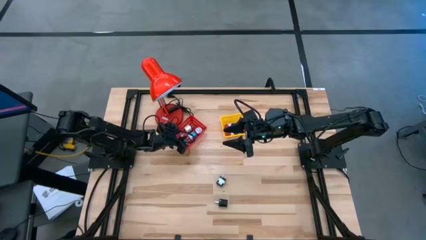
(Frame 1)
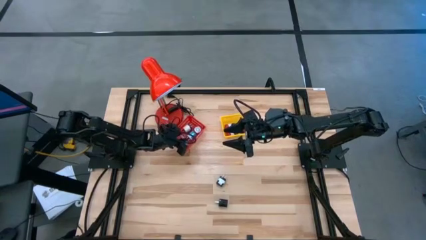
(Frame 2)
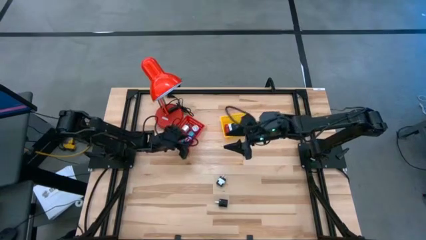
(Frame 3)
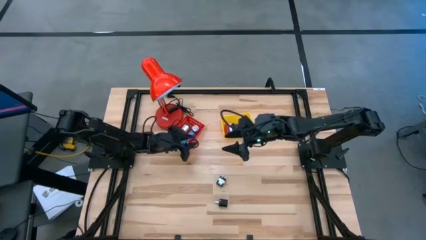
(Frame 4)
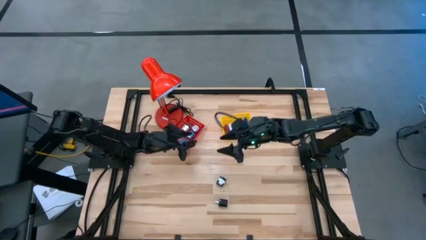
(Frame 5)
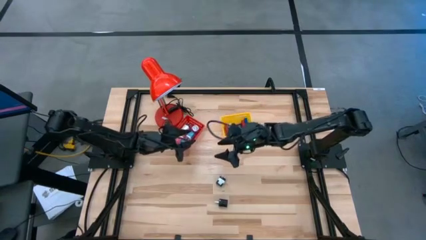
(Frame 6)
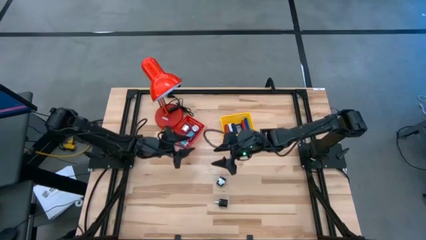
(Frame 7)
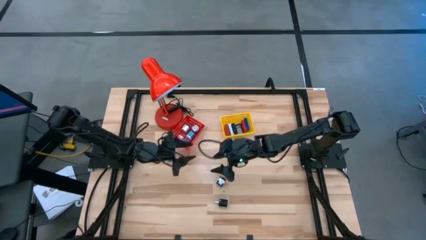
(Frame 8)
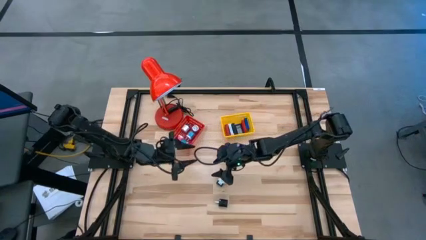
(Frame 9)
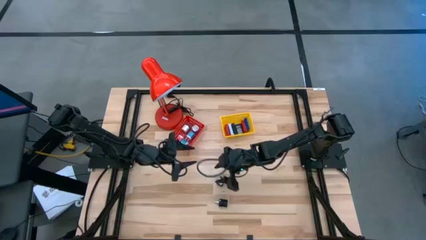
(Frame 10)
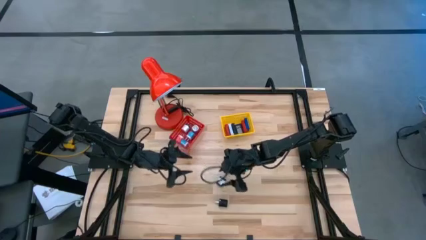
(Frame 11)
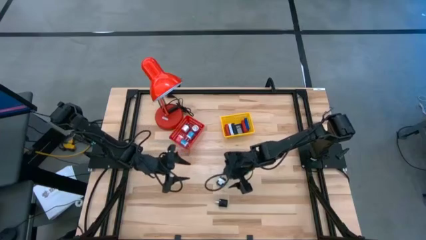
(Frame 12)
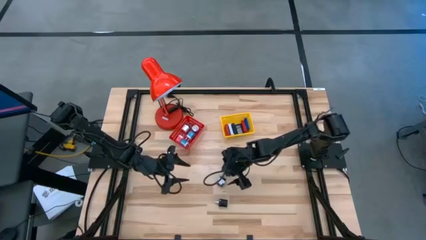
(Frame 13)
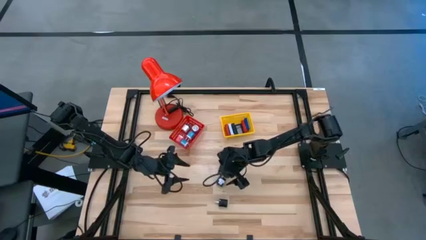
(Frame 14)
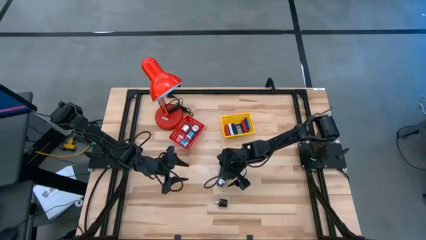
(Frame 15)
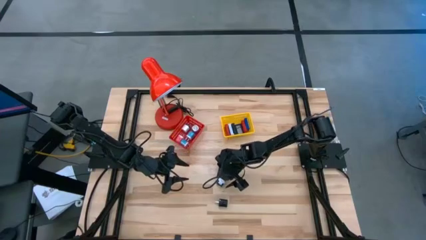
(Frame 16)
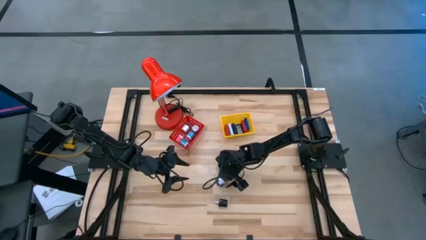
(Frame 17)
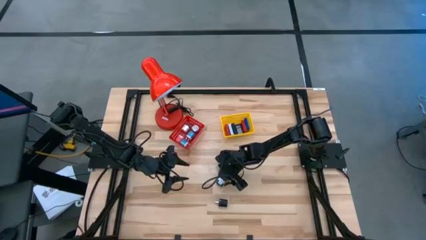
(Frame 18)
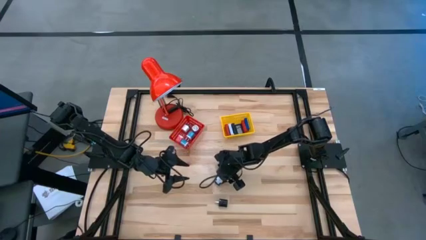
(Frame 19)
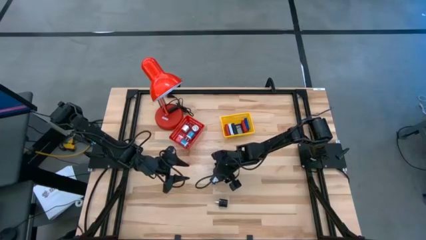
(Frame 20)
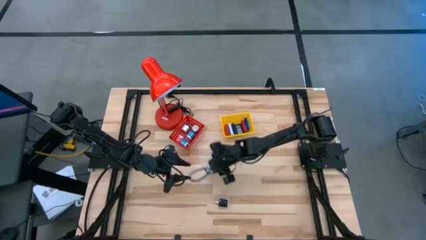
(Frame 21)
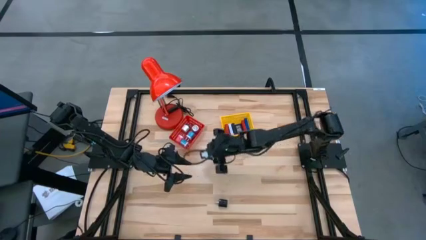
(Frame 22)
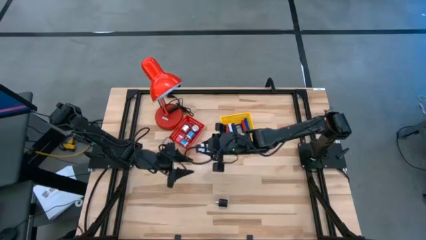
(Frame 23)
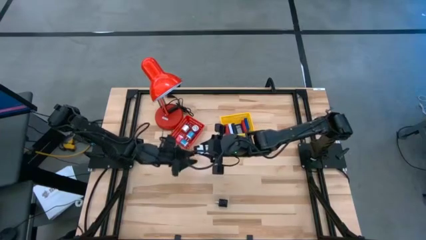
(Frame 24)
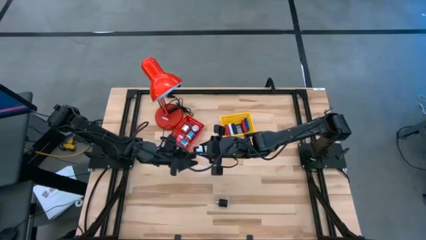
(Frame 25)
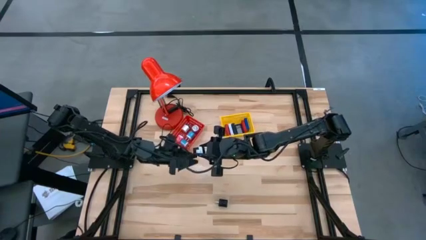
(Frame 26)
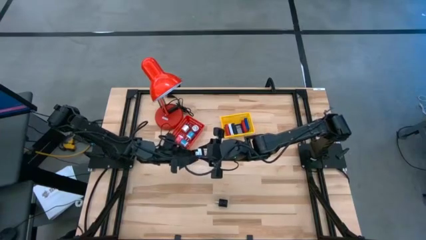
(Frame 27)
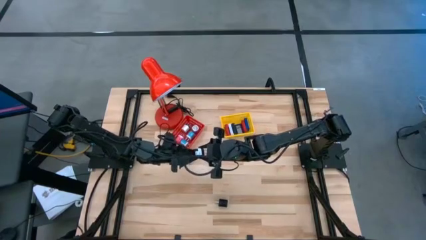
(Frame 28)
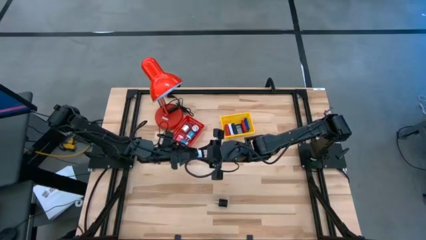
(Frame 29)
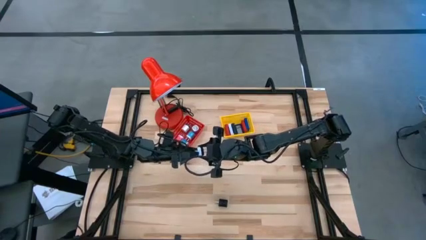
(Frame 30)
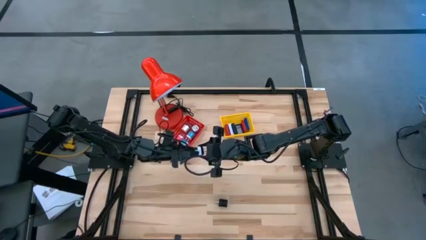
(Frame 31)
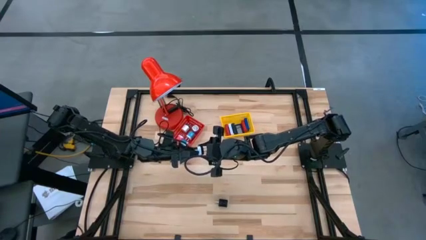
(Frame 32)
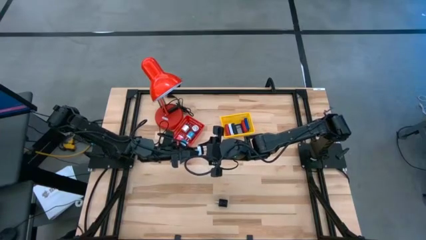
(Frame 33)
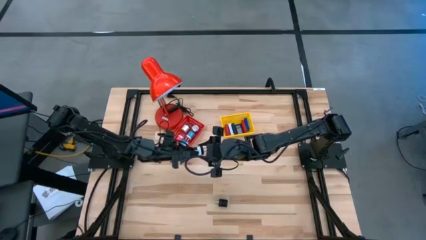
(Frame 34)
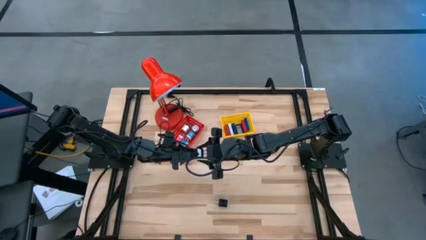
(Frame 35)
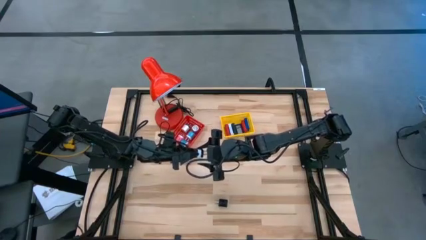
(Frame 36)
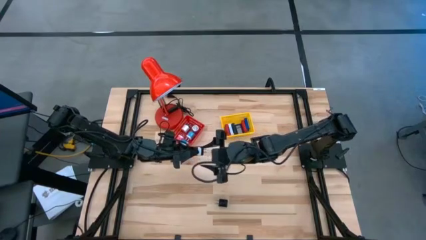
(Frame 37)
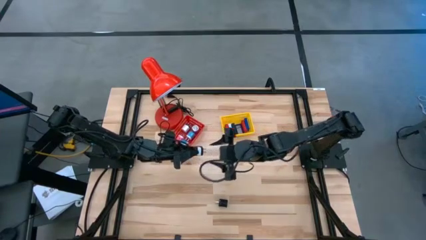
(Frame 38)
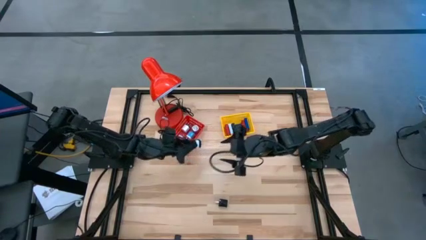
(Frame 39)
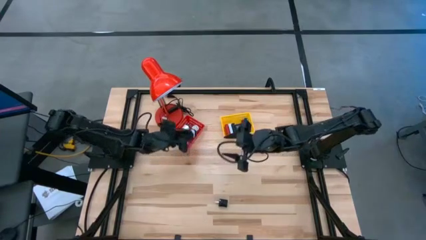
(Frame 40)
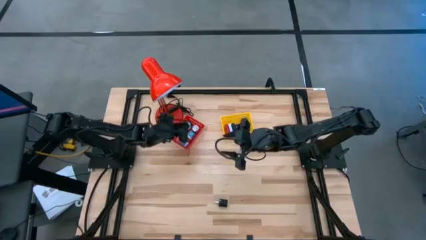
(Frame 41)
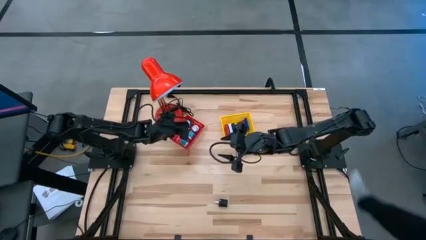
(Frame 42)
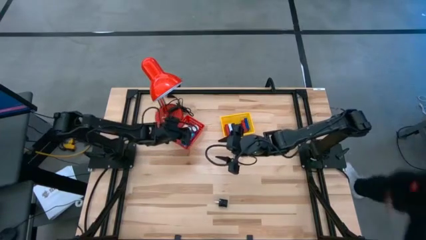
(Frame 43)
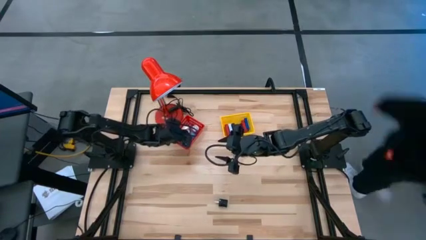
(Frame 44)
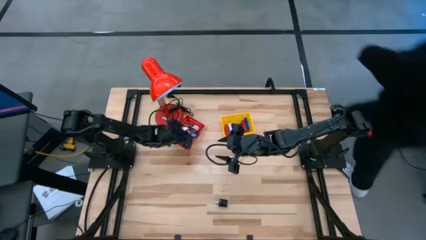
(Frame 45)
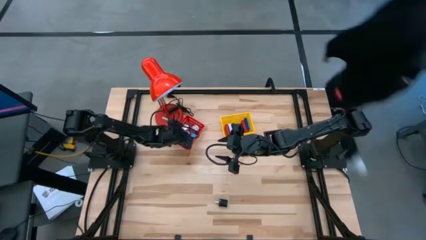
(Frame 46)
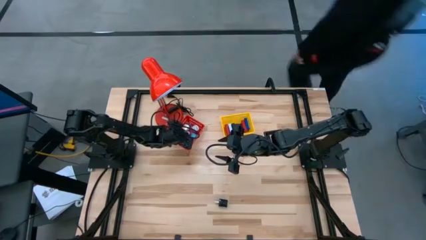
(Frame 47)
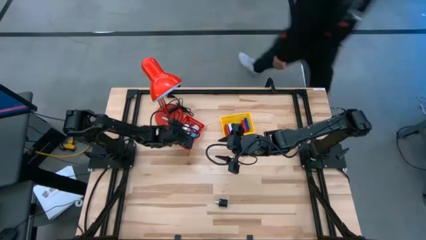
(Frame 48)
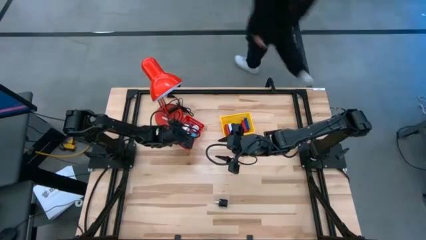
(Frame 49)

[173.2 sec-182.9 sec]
Task: Pick & Place Office items
Put the top black charger adapter into the red bin
